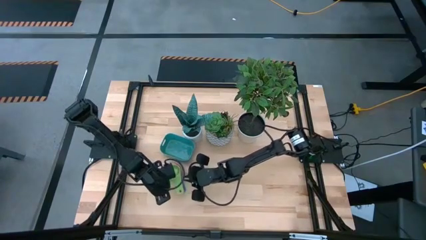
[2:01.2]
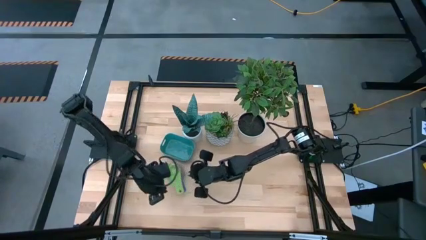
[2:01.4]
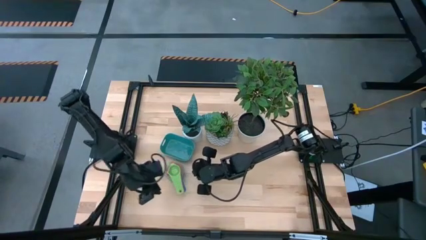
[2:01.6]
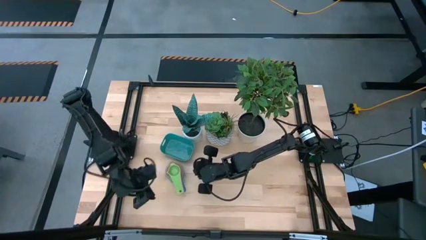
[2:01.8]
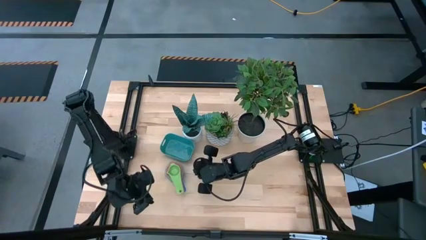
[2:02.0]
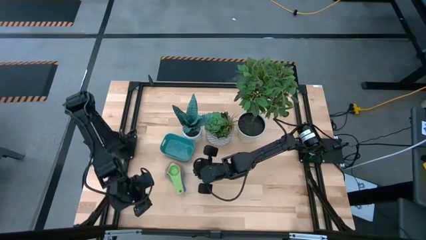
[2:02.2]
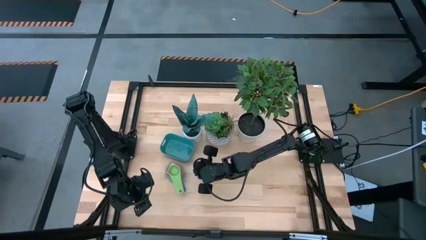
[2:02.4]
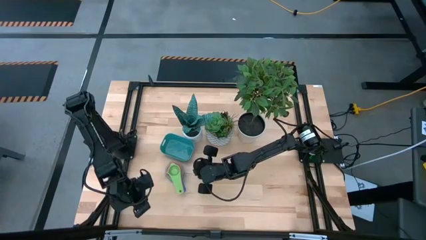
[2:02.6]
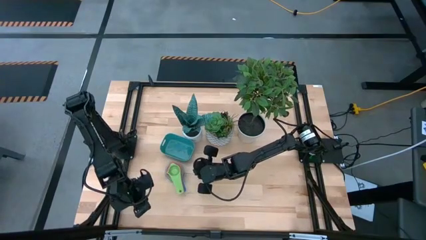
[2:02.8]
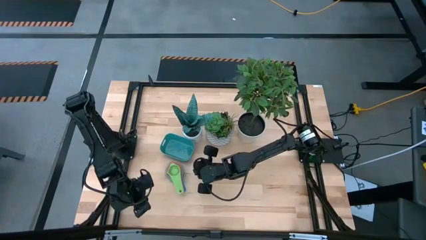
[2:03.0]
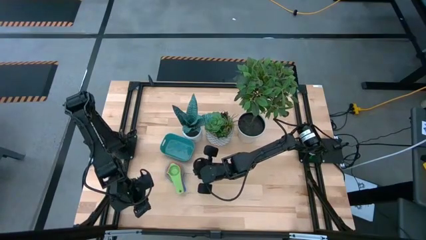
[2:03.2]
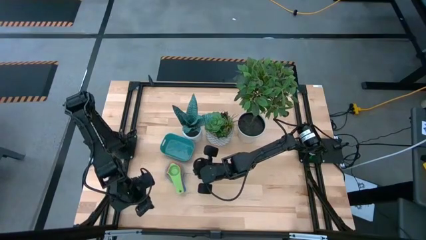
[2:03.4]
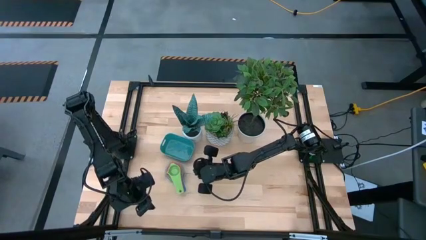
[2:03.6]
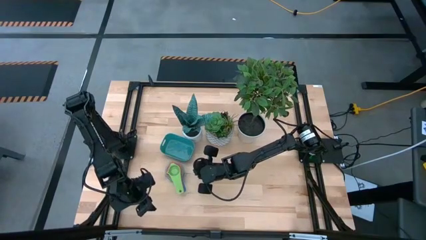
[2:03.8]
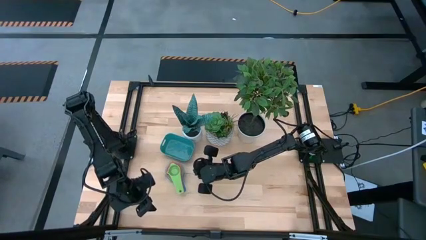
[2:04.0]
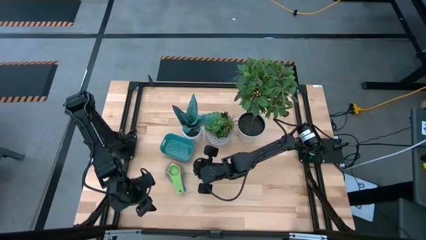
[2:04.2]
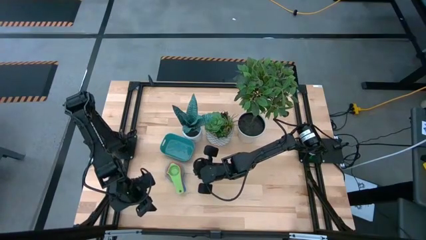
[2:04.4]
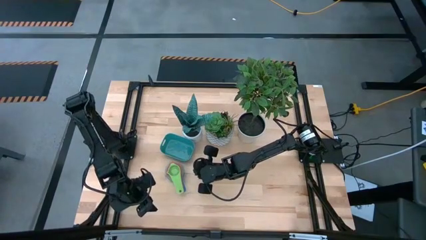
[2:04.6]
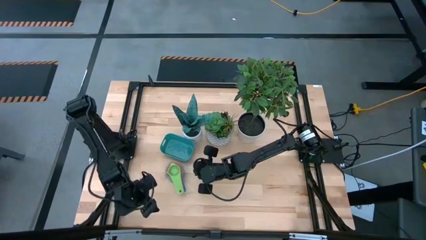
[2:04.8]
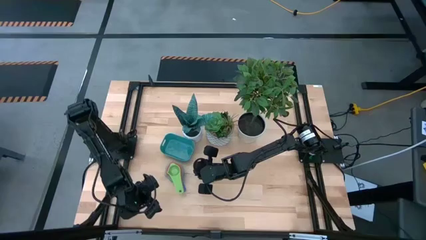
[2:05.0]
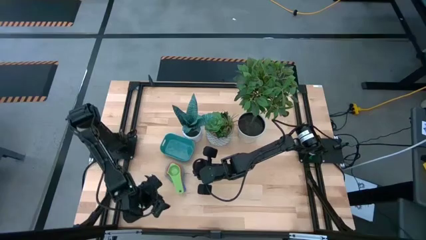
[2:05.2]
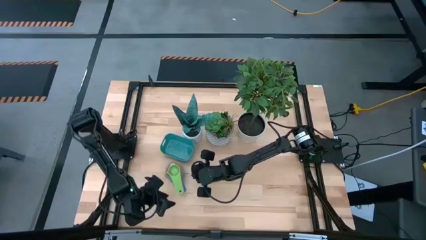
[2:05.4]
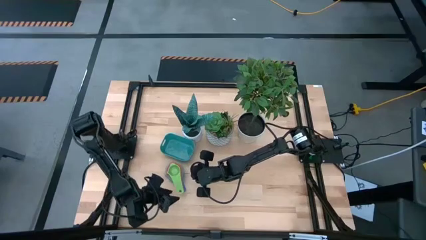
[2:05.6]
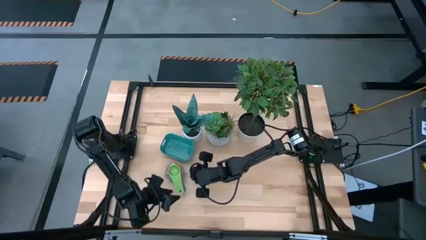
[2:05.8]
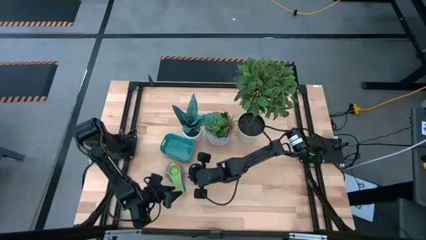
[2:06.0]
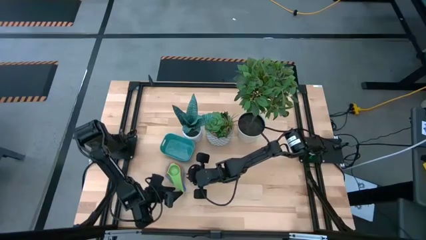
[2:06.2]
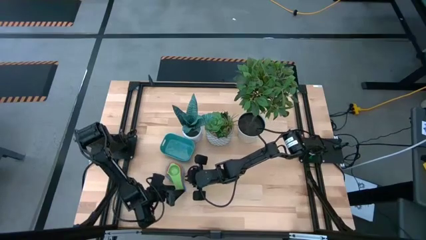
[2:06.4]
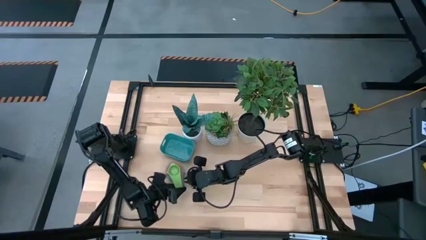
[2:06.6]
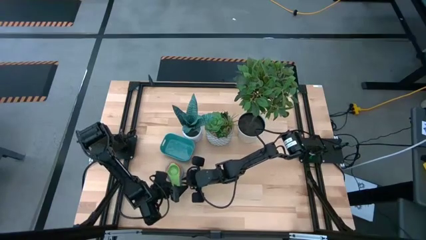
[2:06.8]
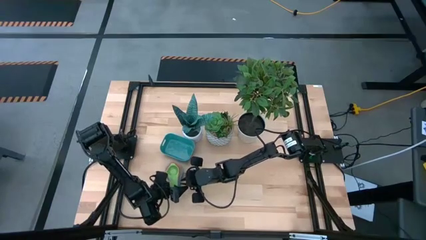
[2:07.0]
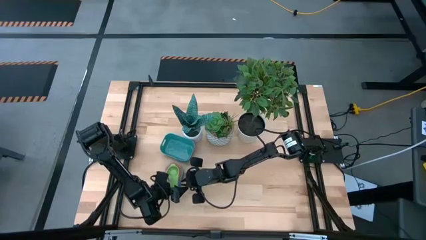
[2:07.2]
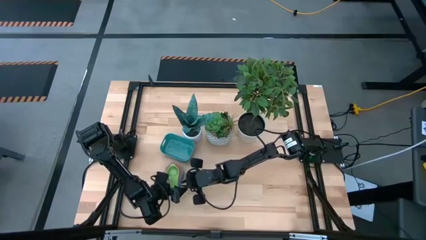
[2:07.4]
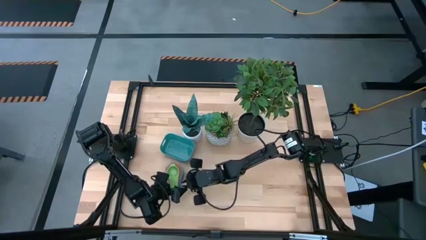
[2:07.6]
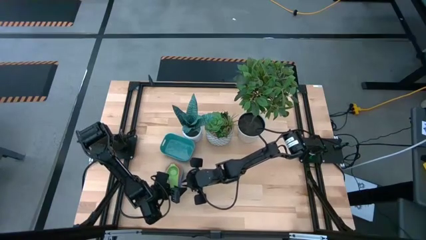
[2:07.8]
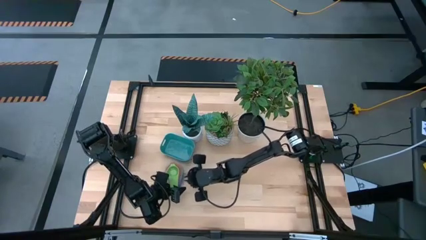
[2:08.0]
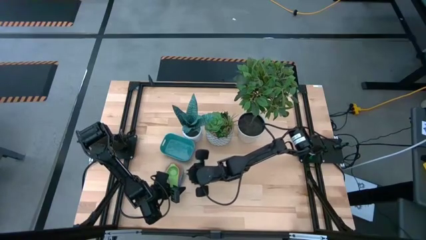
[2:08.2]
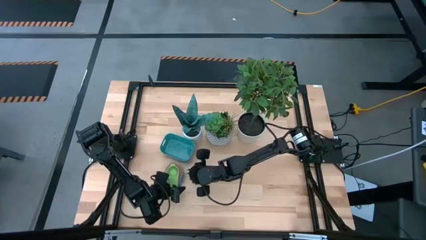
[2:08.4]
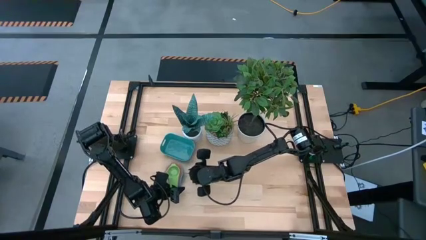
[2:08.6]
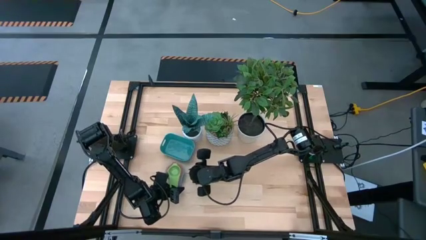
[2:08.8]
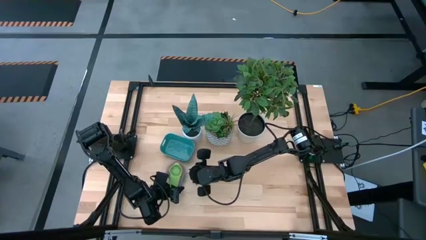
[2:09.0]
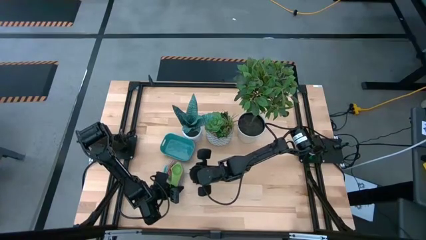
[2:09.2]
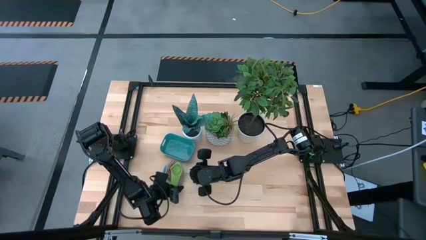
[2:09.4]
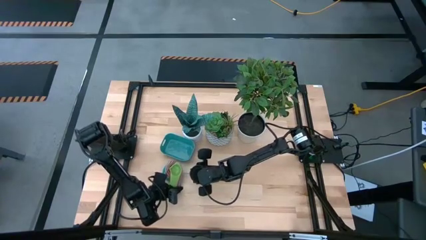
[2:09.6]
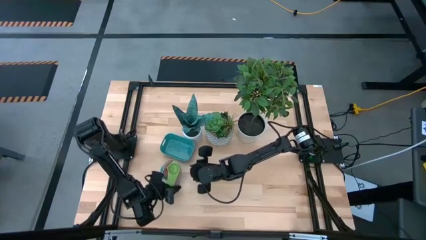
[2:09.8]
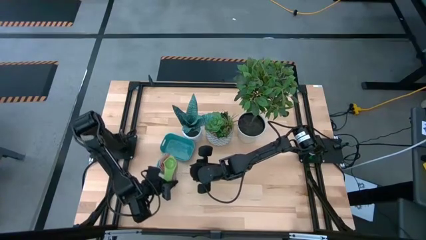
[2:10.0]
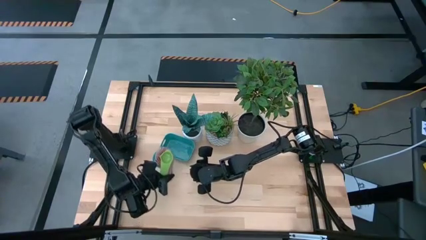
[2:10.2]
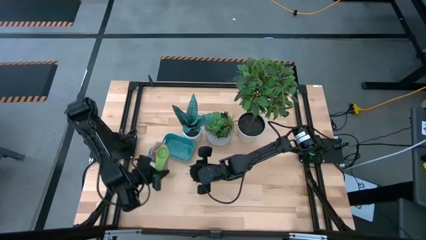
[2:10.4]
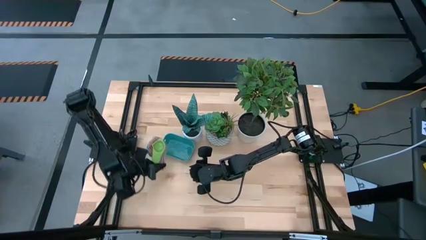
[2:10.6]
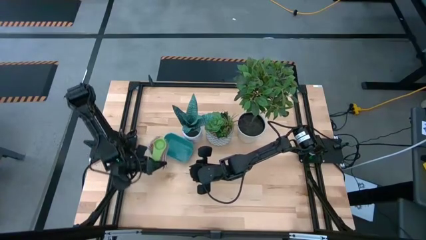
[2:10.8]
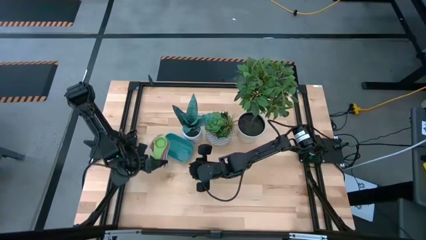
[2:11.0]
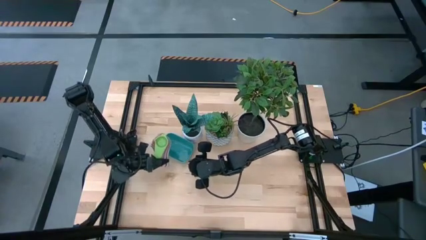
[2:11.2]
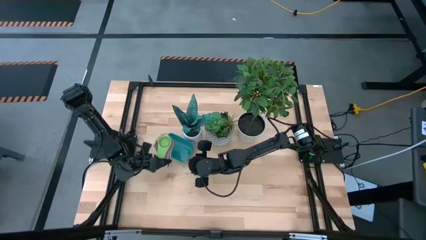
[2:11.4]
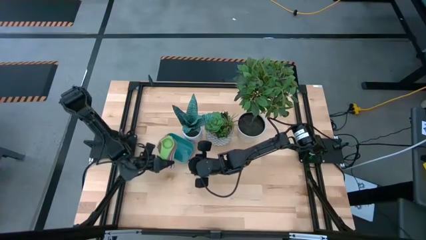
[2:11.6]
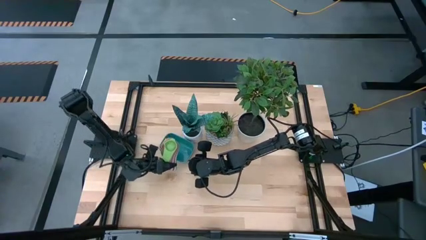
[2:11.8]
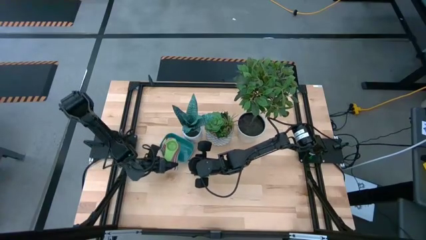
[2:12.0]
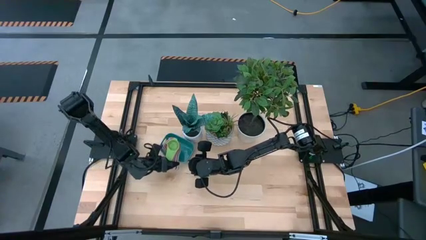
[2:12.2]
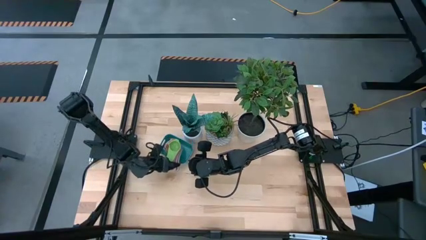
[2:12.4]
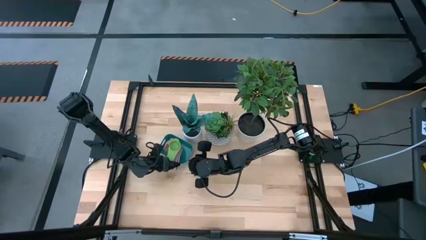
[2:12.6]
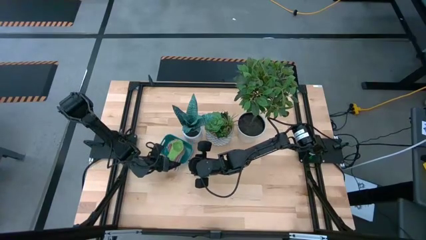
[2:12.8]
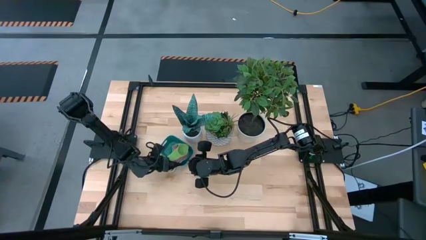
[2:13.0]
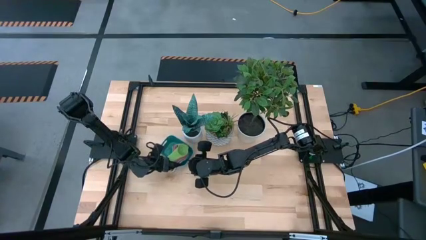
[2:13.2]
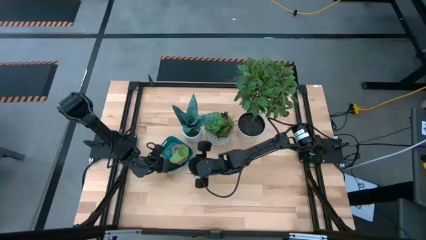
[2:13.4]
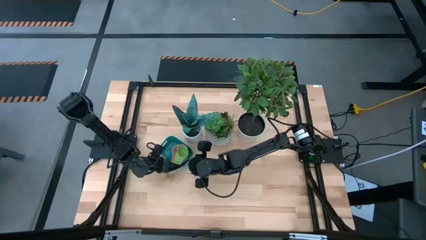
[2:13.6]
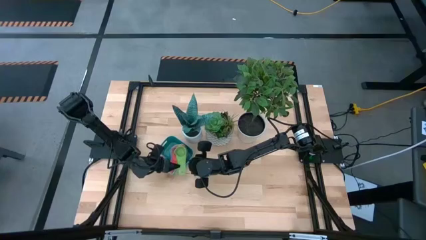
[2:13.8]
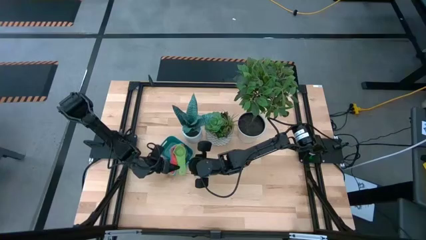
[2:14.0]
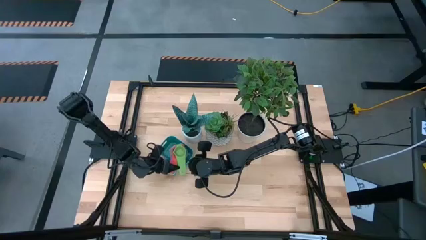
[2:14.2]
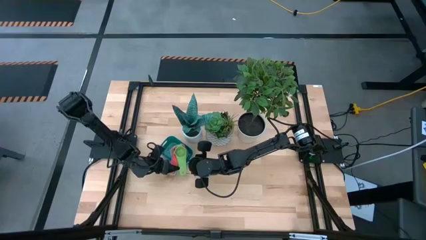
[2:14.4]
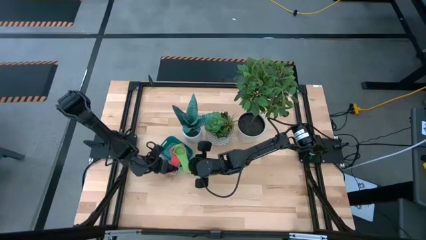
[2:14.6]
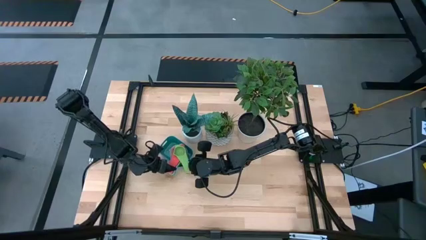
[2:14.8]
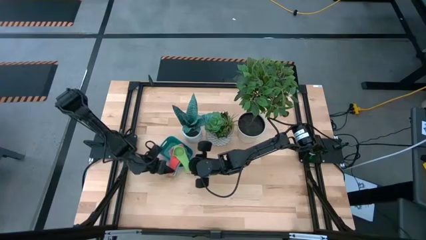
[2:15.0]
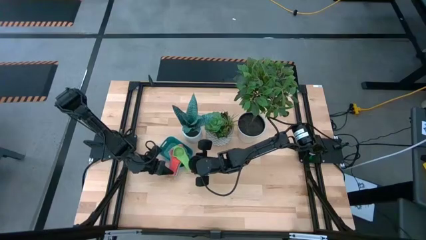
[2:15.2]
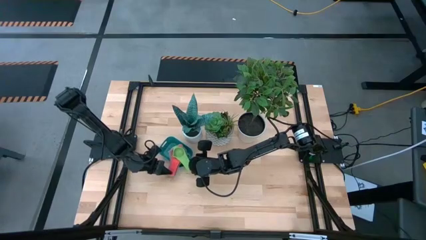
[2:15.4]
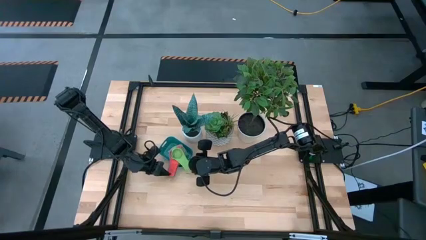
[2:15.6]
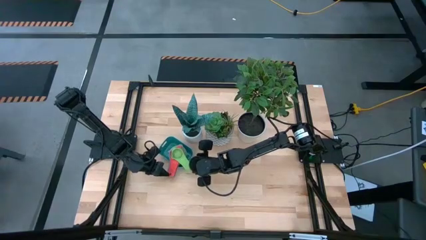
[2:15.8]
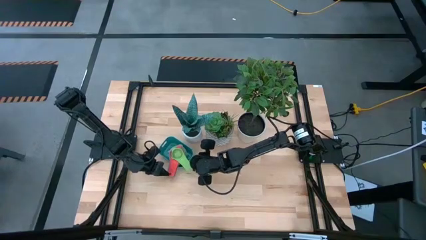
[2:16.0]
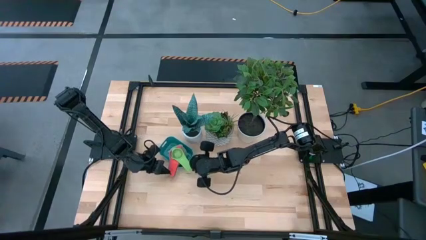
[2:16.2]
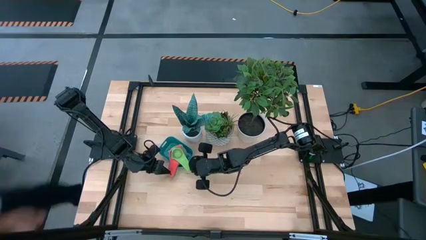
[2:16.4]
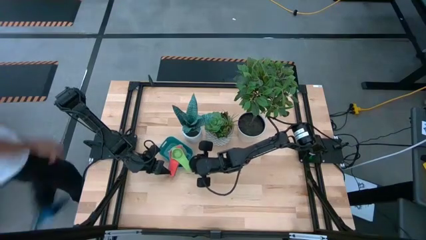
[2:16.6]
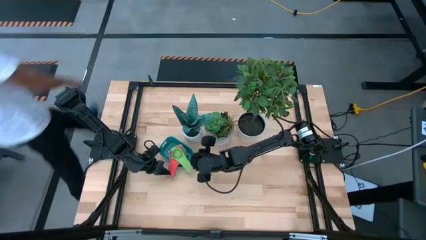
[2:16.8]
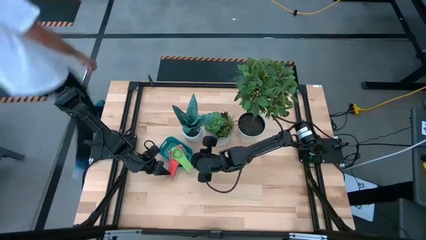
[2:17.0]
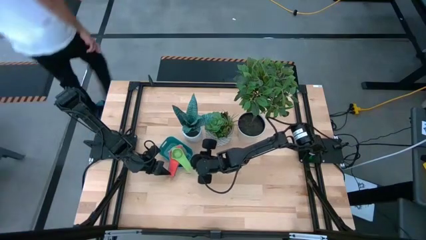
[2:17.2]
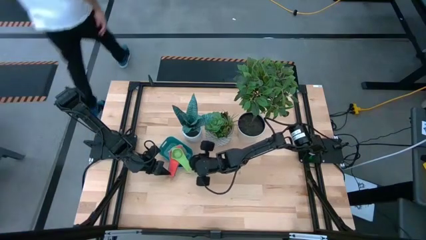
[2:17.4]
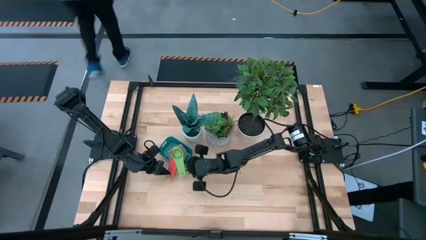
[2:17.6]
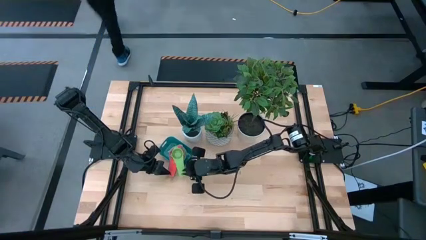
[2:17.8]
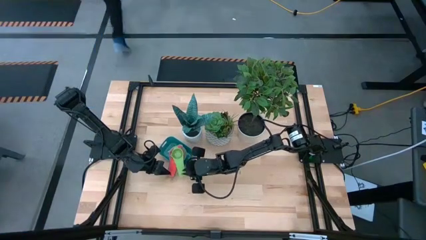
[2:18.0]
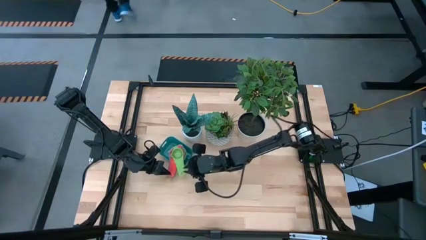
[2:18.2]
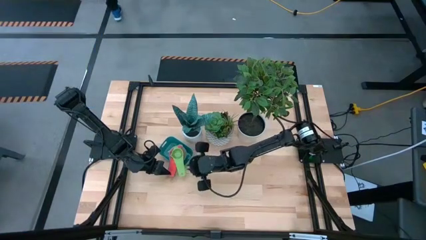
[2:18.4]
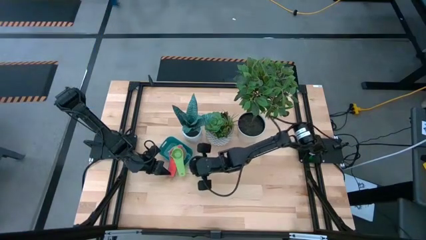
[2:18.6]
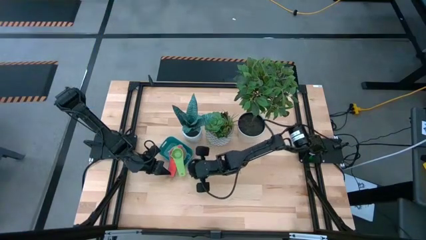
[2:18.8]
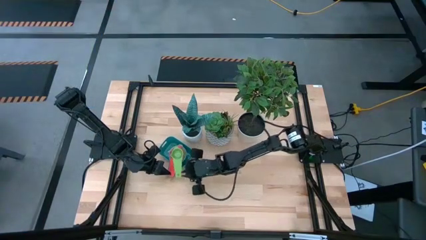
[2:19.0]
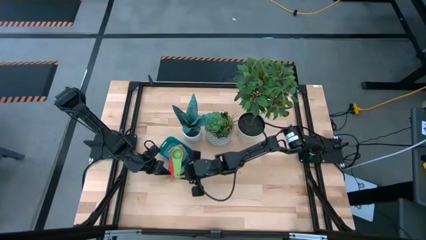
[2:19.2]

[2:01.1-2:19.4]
Task: Nest measuring cups in basket
Put the stacked measuring cups into the blue bin
